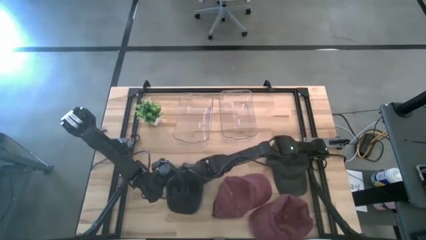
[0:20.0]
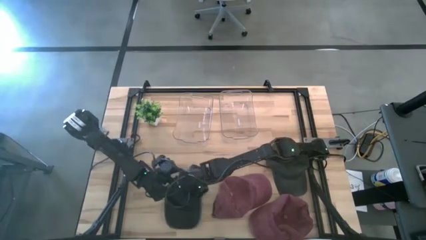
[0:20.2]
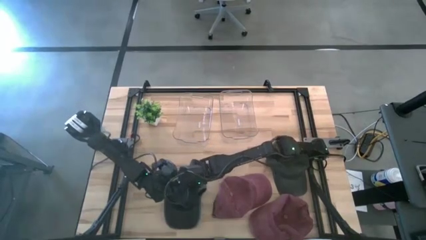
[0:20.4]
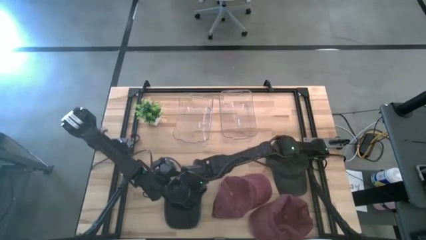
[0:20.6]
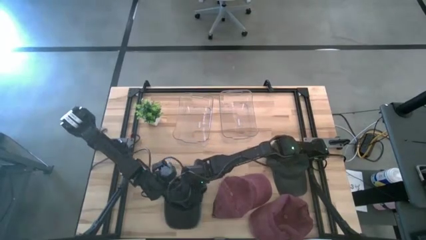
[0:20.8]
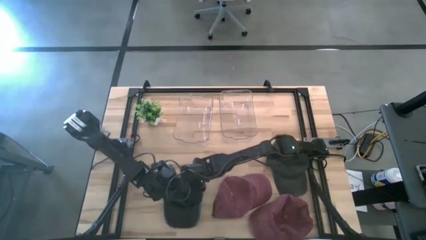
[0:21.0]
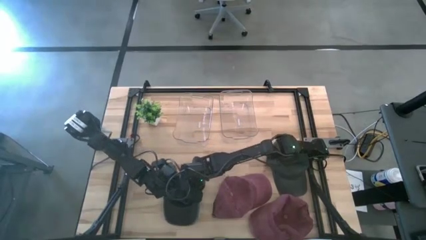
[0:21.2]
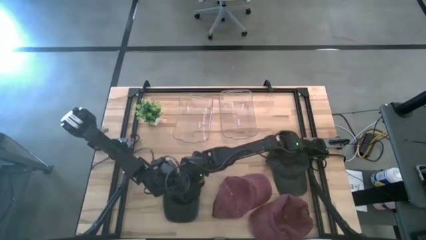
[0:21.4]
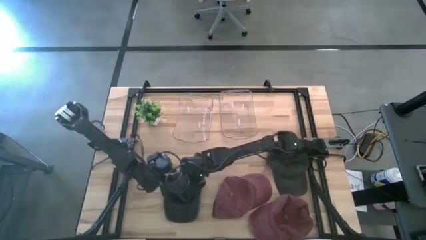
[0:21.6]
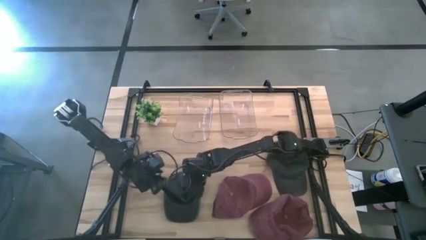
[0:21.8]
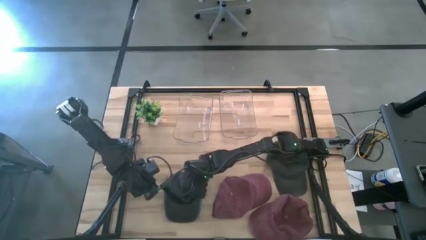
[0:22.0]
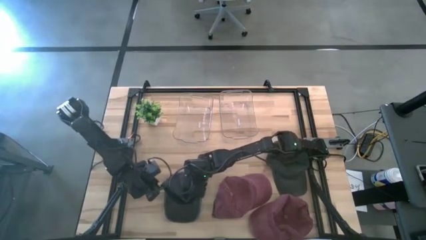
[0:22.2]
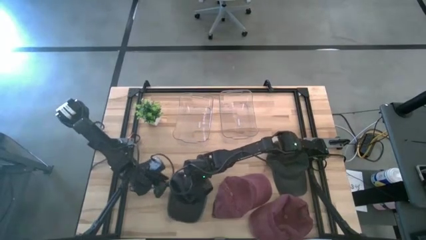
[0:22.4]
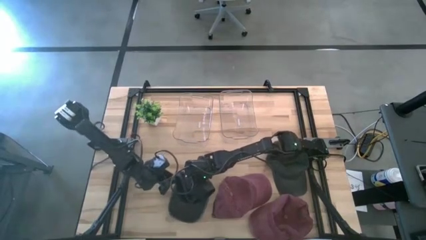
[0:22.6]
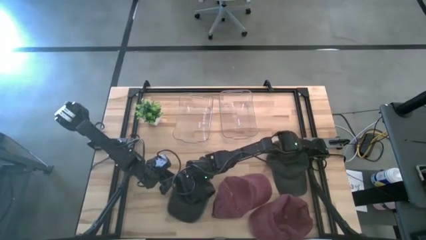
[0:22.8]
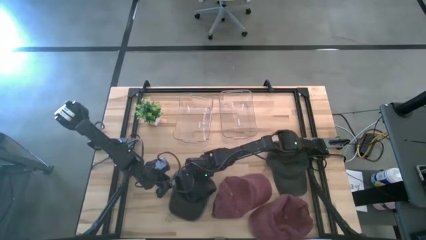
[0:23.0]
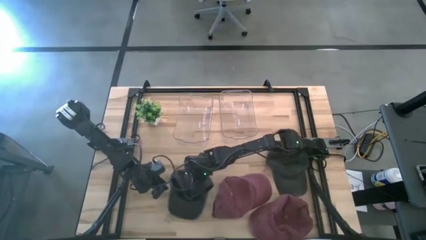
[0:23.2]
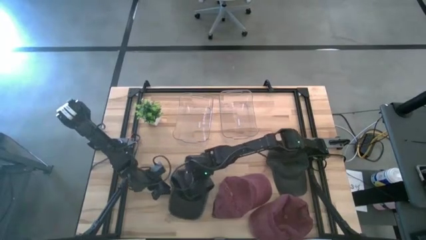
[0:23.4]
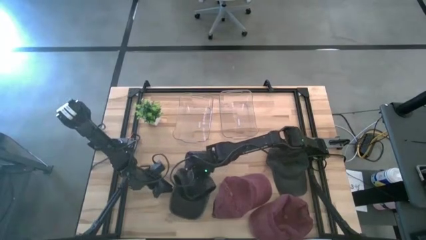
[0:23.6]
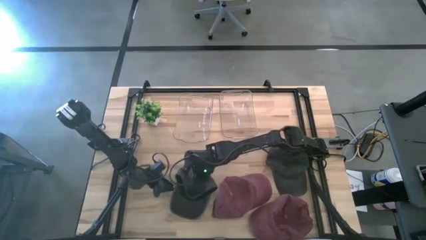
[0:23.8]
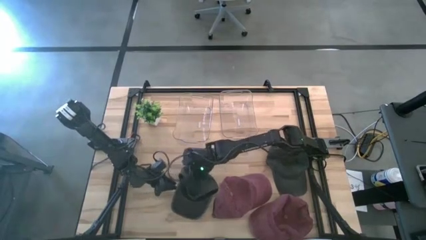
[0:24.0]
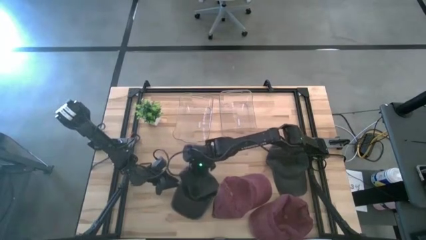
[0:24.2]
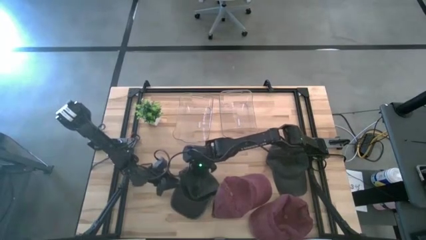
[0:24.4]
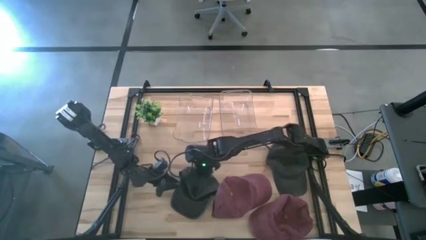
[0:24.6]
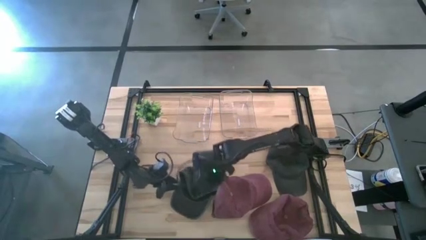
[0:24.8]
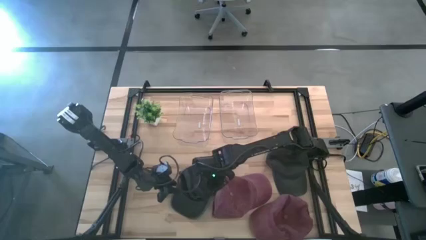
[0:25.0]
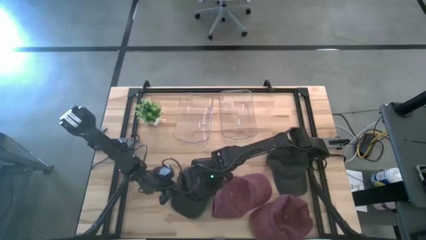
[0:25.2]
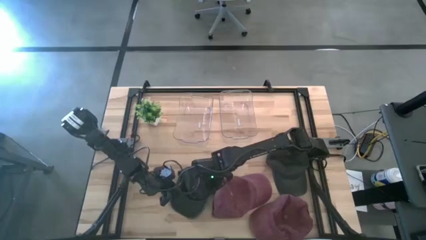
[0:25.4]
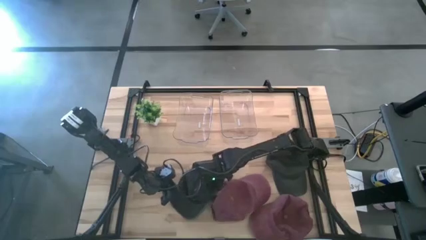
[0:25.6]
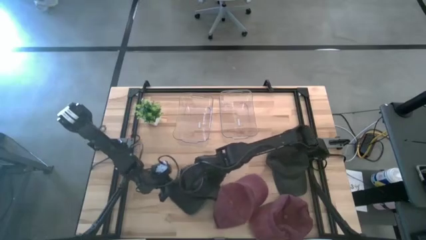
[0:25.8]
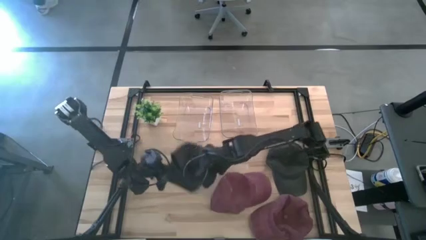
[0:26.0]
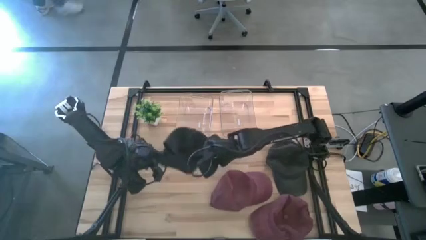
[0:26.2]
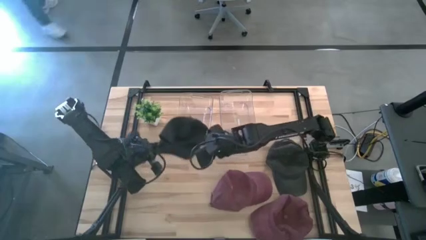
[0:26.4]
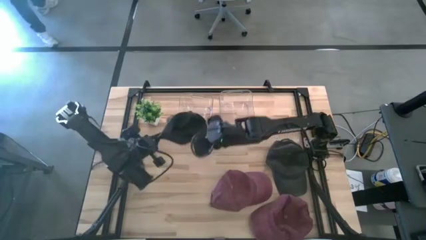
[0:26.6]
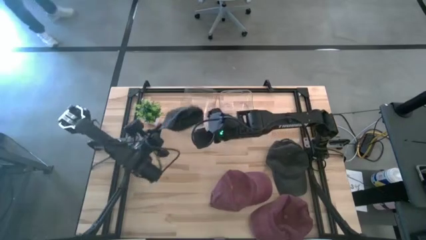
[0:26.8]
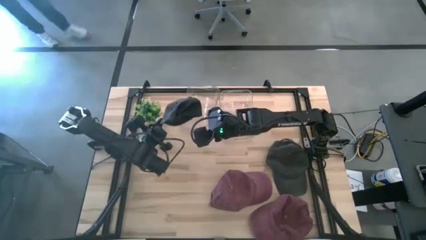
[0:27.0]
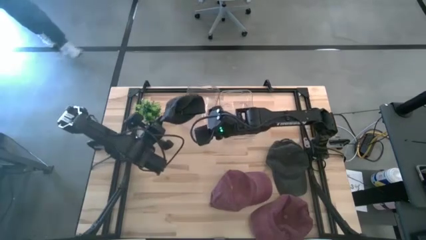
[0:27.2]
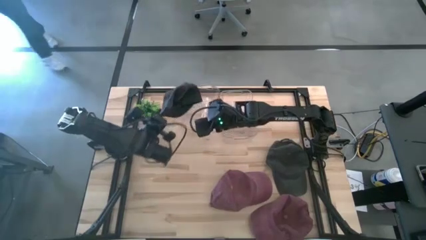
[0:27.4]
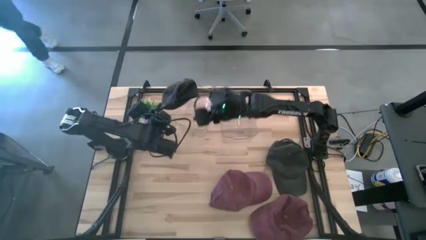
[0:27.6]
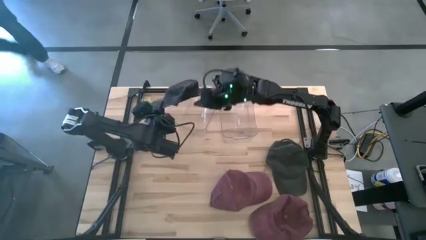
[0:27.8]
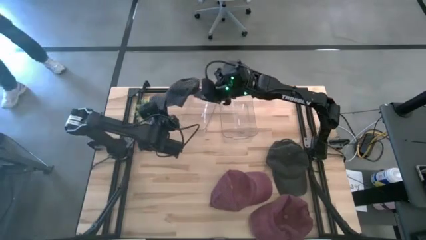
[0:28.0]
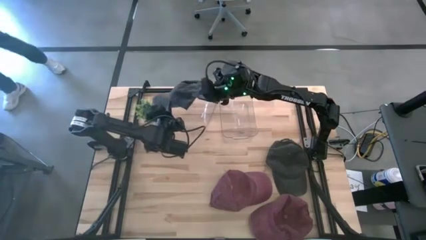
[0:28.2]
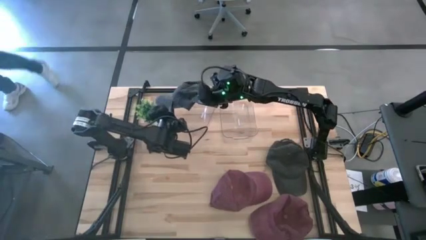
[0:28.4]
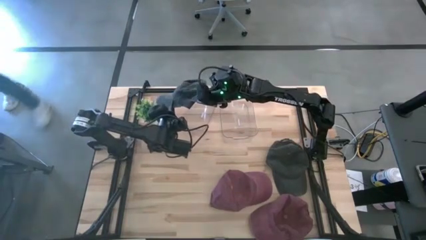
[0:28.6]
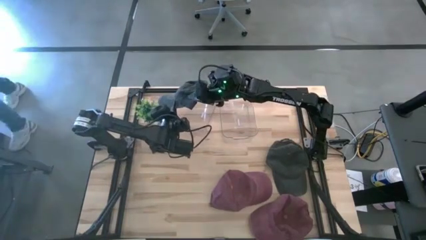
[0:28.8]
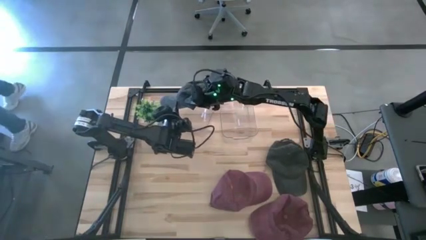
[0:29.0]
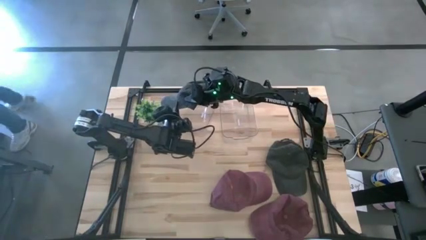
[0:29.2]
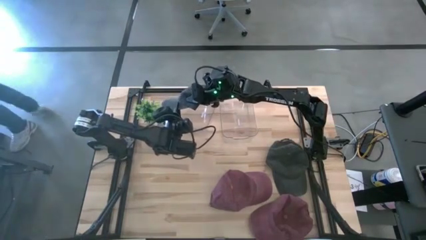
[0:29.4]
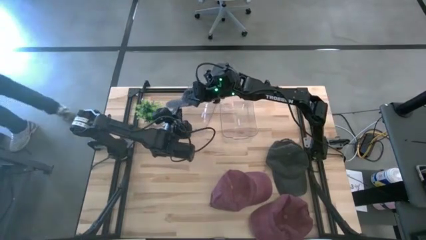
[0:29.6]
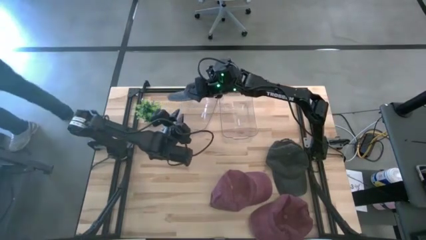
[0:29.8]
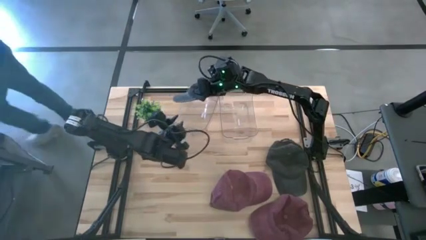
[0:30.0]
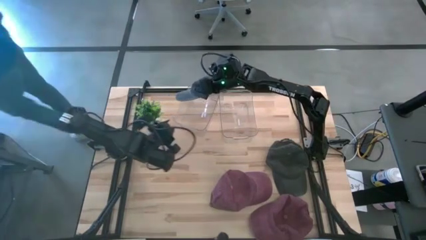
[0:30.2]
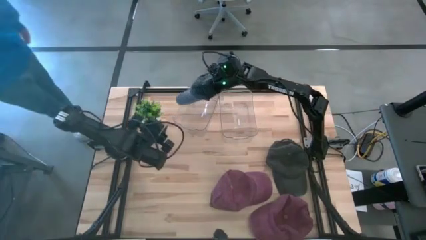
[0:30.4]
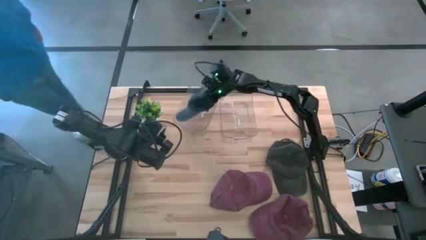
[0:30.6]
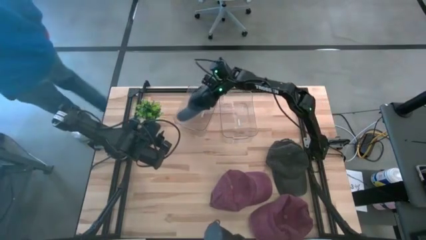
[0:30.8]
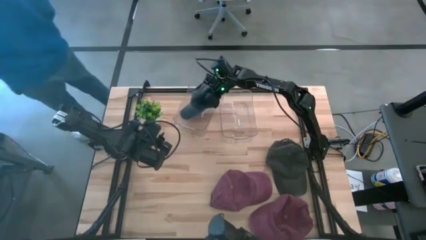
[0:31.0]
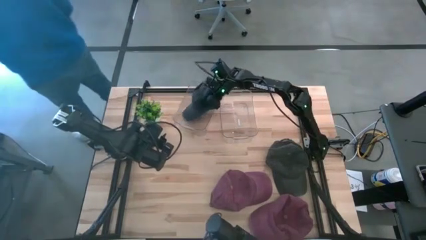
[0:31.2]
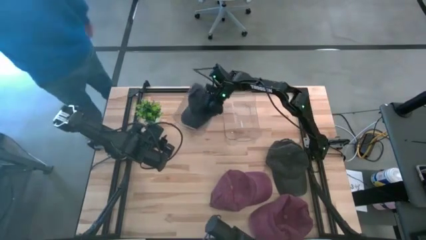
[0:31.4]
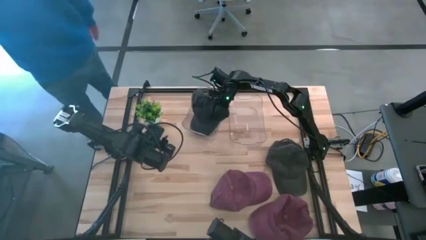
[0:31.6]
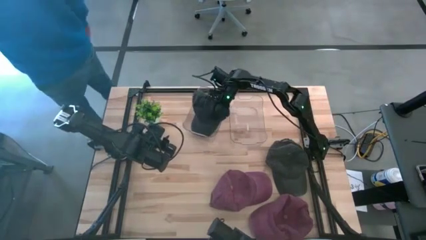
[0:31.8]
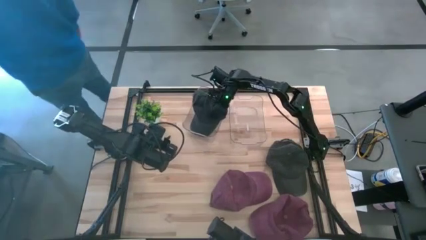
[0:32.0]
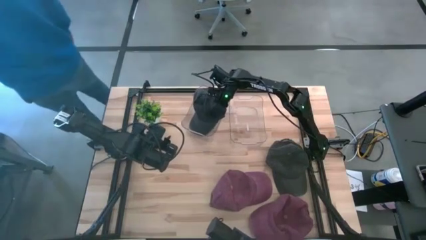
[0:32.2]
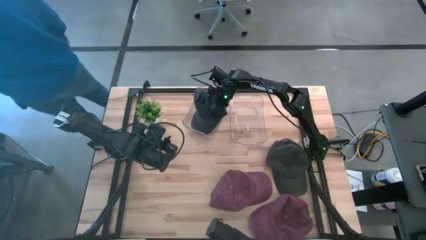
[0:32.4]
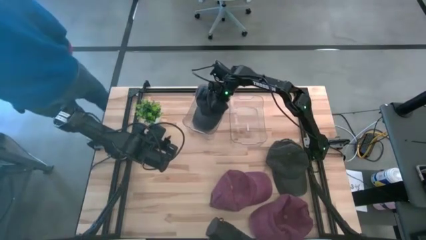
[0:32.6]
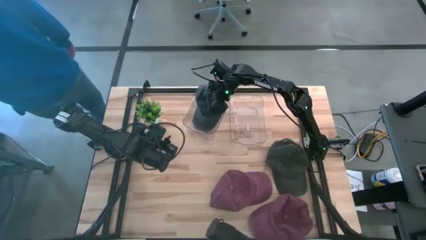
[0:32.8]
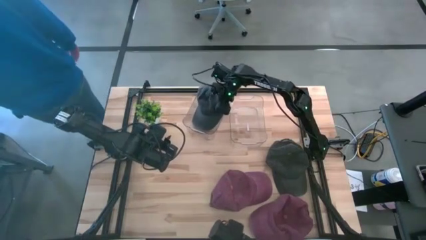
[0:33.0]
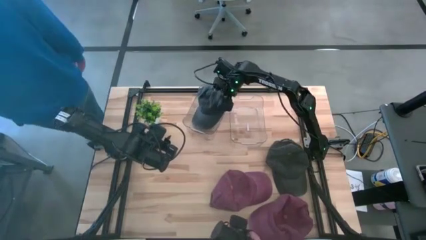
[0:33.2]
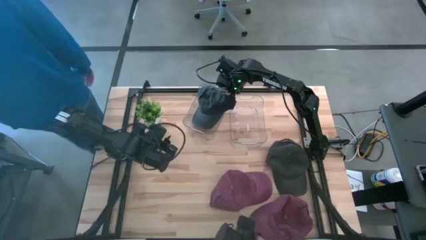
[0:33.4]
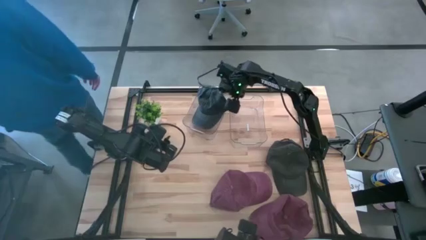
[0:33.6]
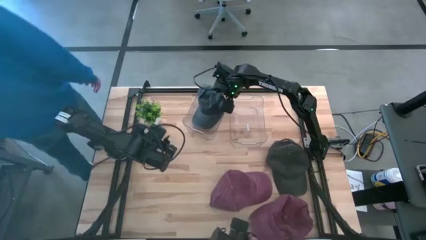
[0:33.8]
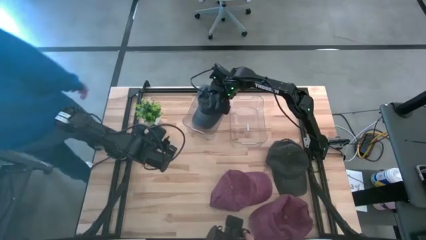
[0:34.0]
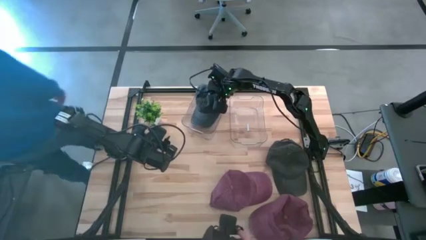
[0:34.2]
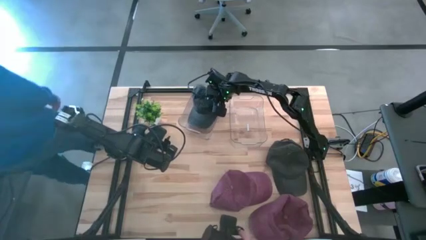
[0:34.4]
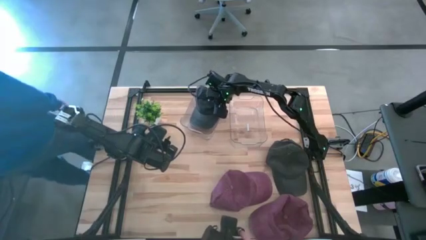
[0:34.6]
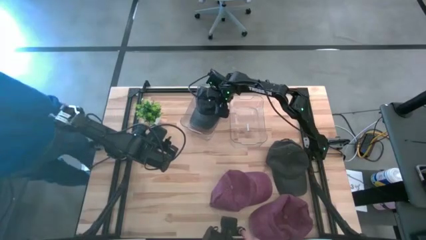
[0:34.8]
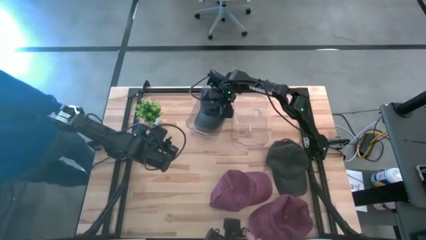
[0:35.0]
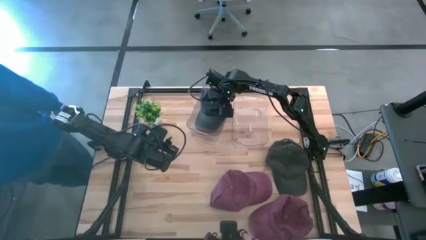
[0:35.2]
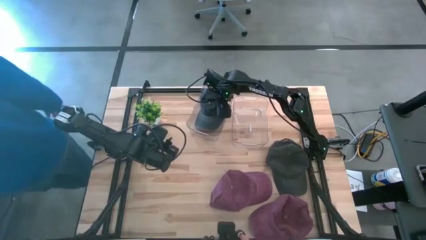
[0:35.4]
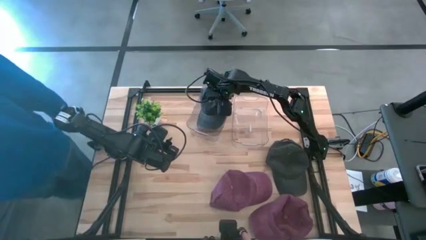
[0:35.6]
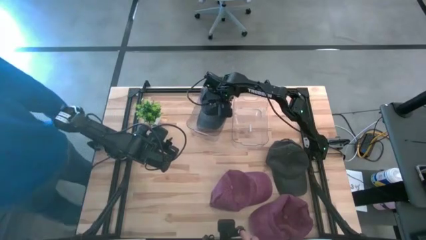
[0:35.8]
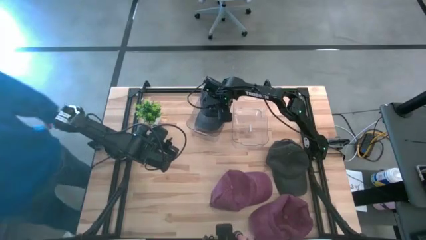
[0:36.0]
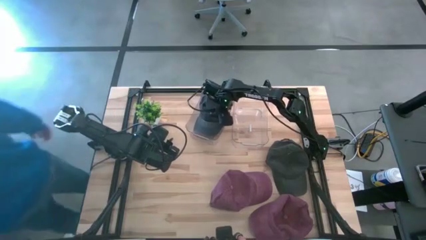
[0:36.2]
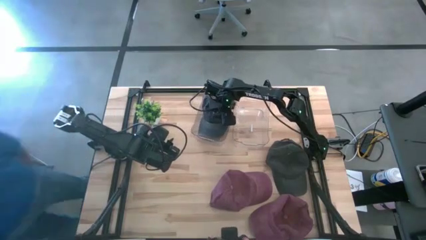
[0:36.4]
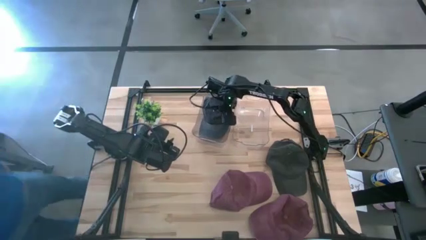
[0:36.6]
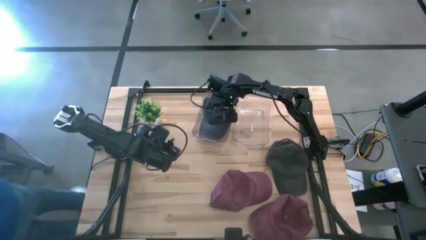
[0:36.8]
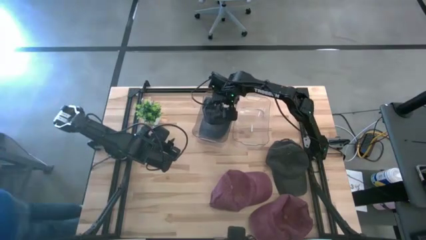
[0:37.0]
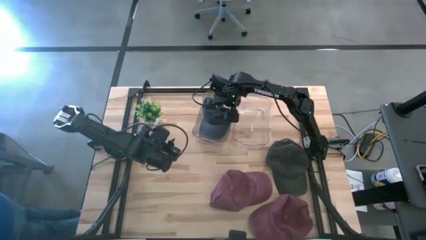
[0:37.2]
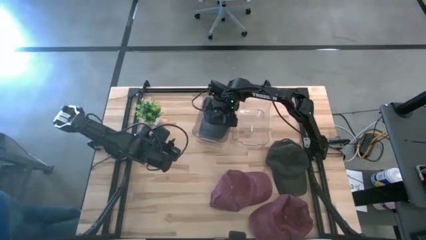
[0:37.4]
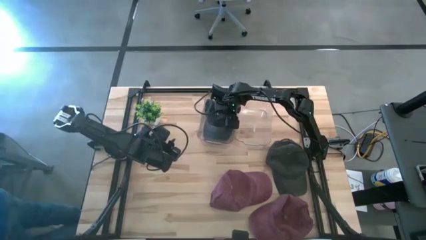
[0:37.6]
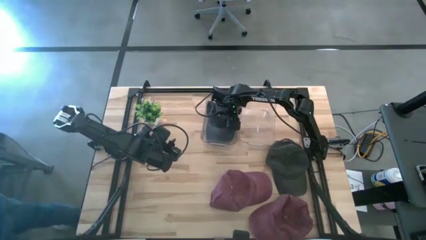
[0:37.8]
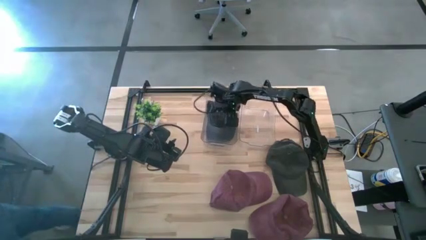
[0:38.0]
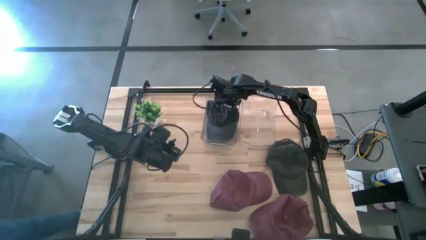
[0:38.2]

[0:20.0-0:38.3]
Task: Pick & Place hat
Put the black cap into the left transparent bin
